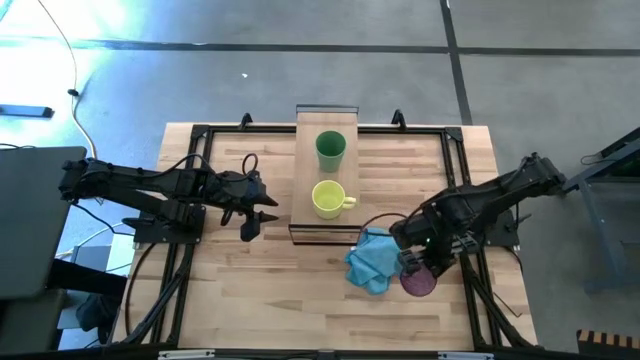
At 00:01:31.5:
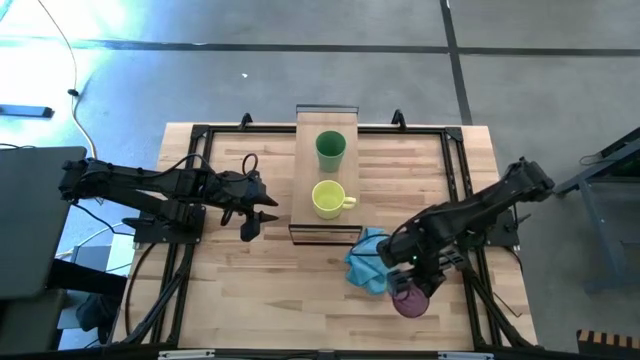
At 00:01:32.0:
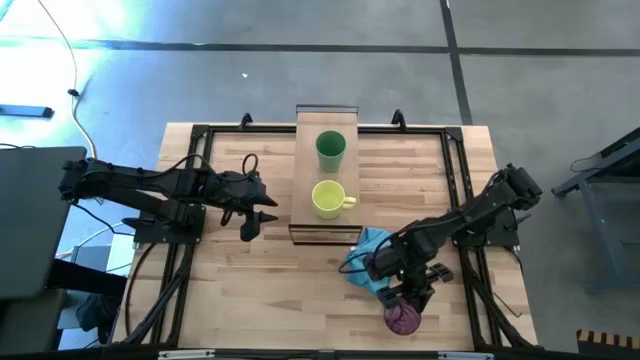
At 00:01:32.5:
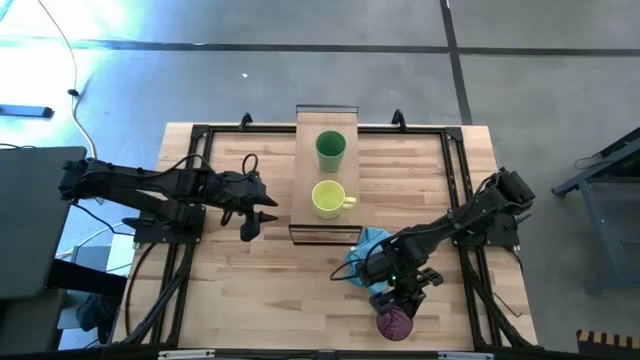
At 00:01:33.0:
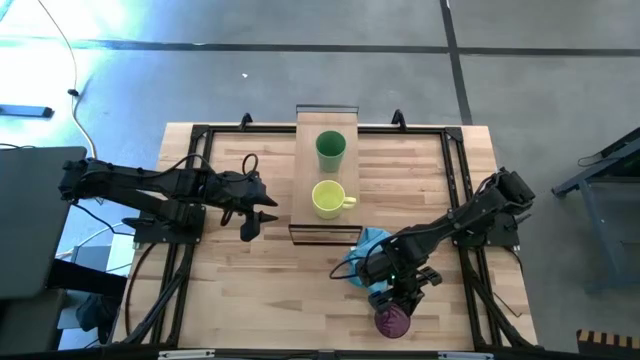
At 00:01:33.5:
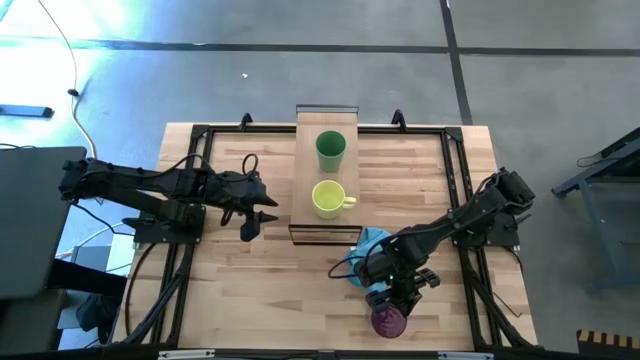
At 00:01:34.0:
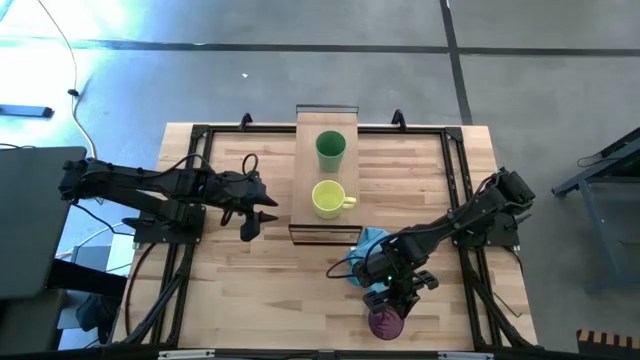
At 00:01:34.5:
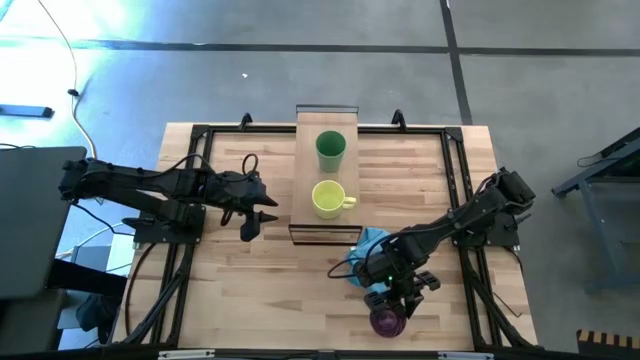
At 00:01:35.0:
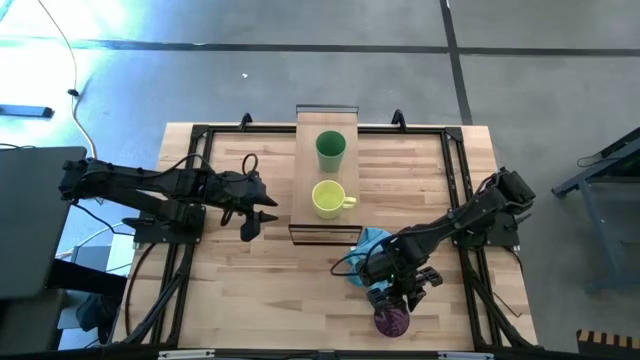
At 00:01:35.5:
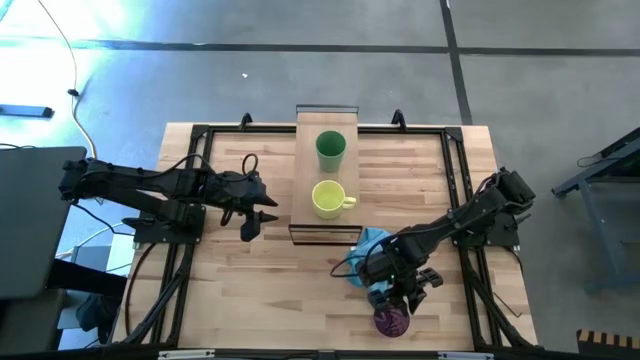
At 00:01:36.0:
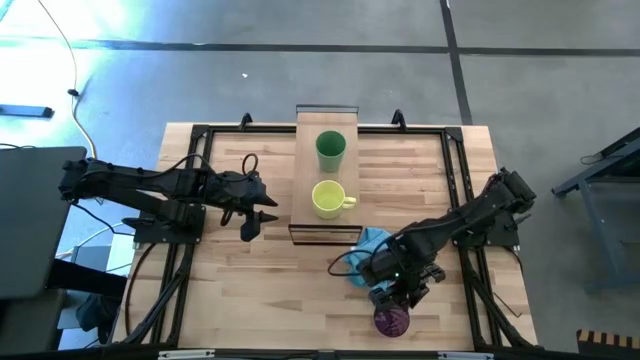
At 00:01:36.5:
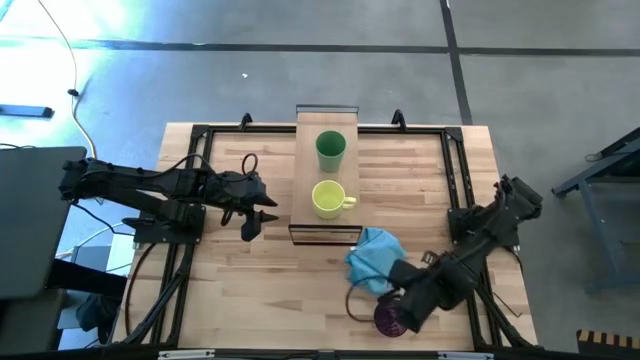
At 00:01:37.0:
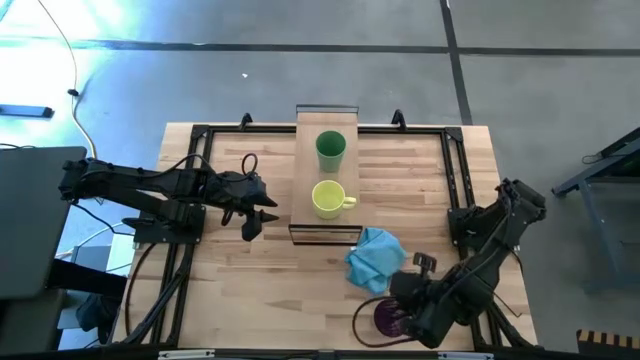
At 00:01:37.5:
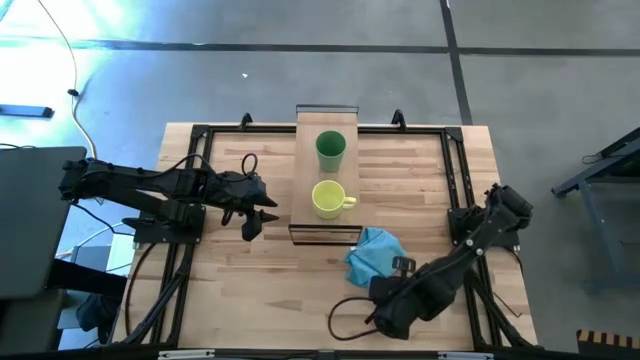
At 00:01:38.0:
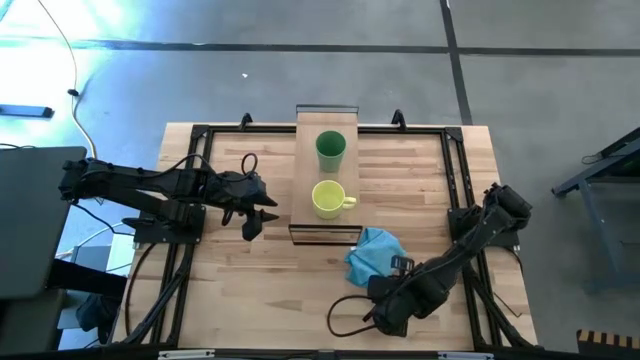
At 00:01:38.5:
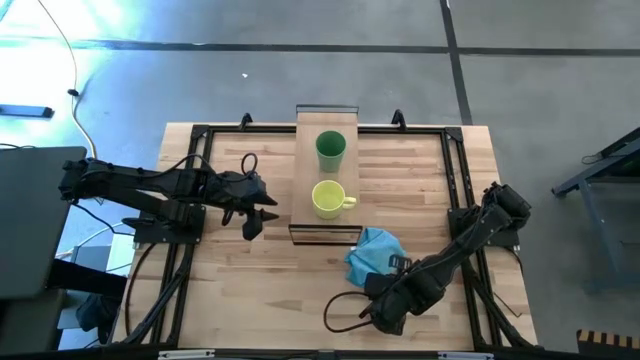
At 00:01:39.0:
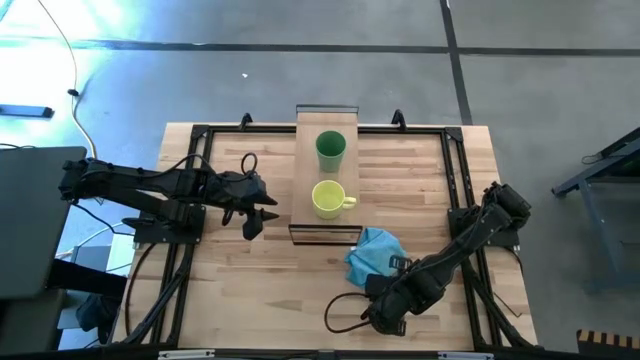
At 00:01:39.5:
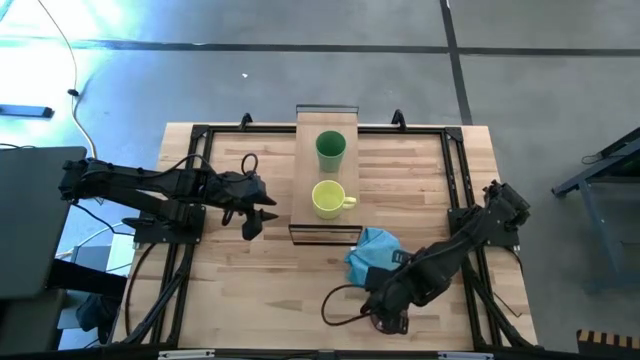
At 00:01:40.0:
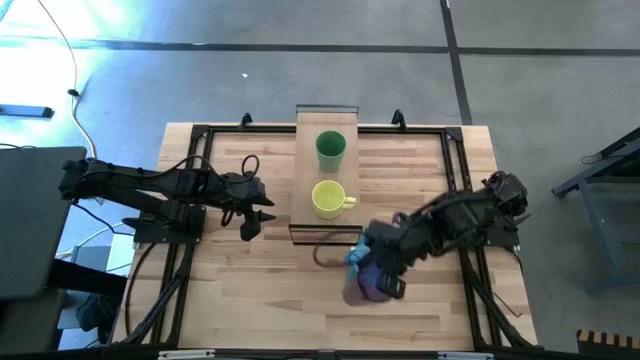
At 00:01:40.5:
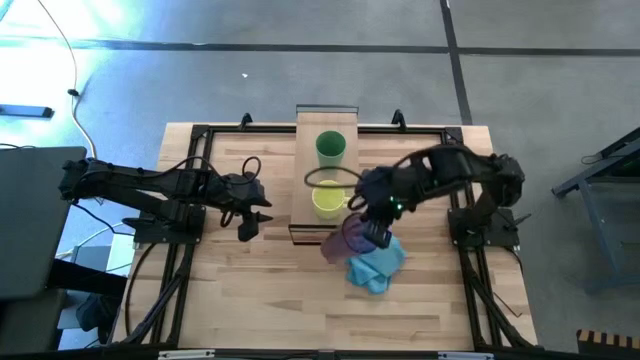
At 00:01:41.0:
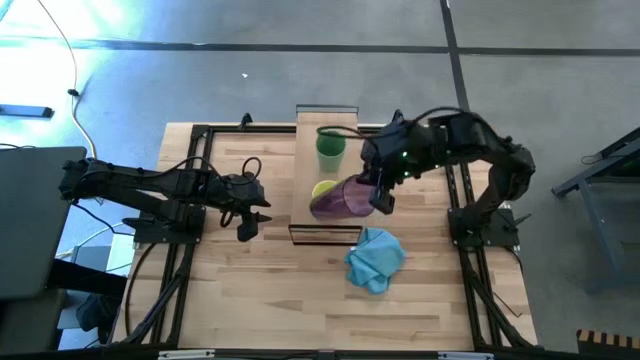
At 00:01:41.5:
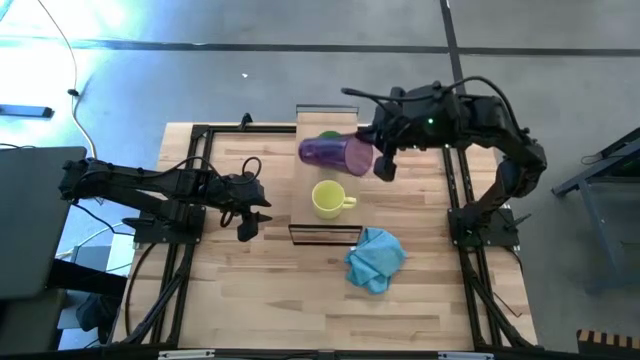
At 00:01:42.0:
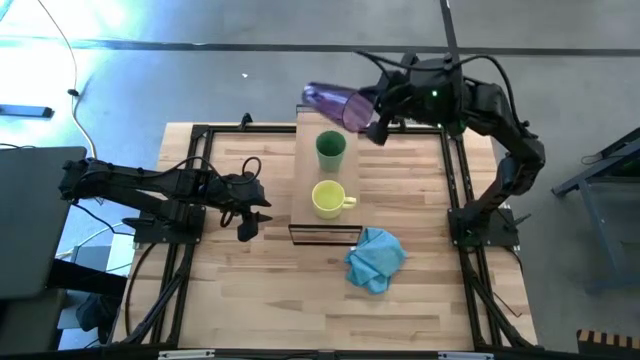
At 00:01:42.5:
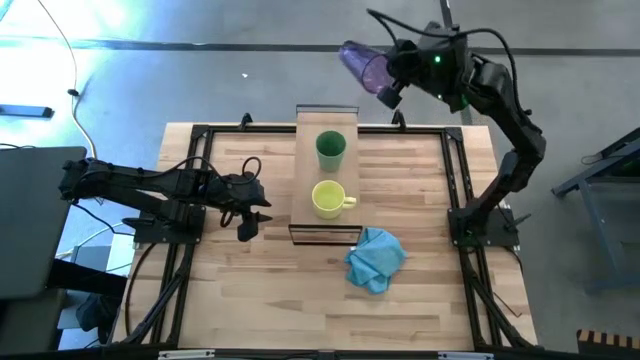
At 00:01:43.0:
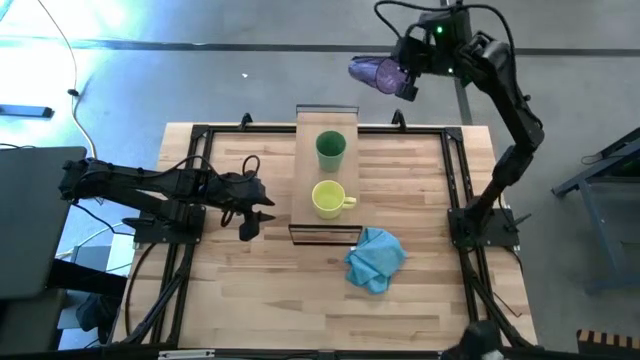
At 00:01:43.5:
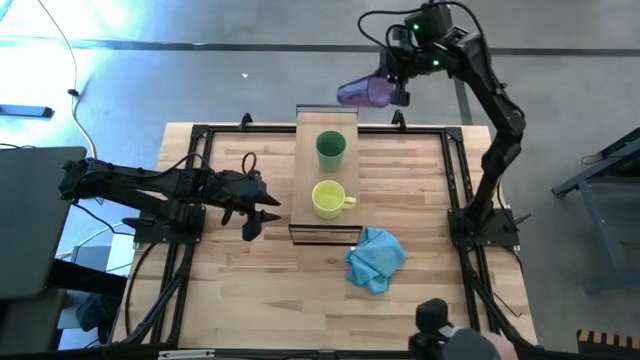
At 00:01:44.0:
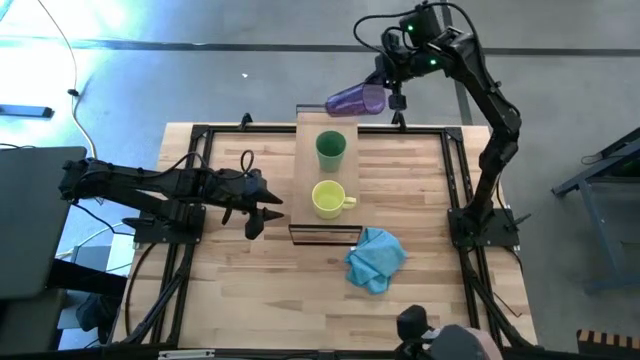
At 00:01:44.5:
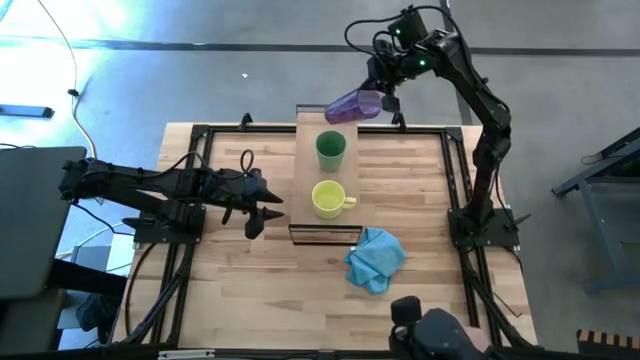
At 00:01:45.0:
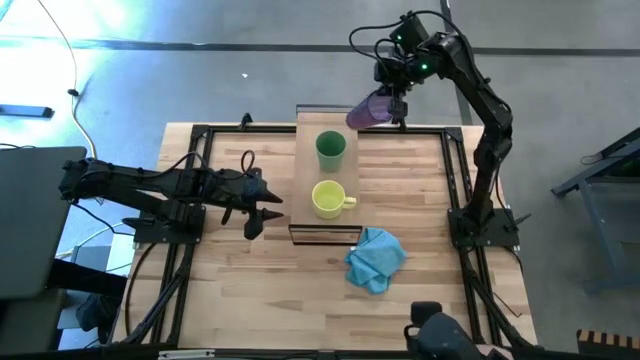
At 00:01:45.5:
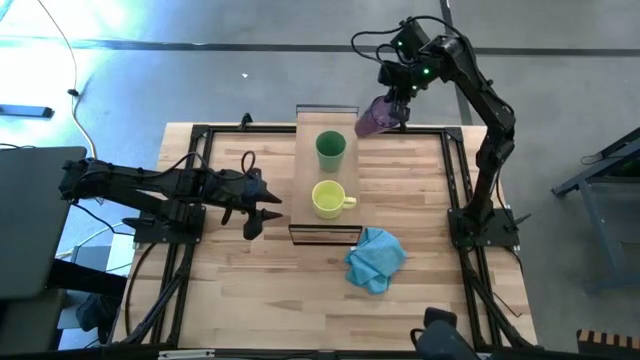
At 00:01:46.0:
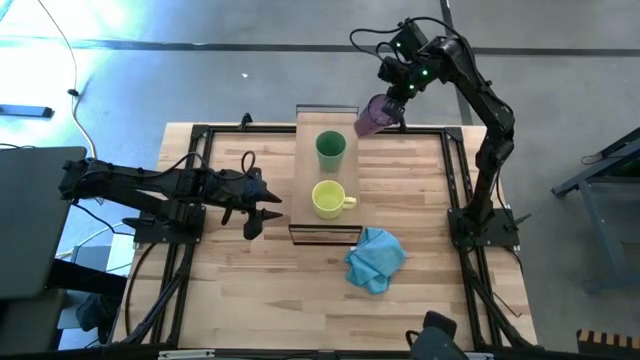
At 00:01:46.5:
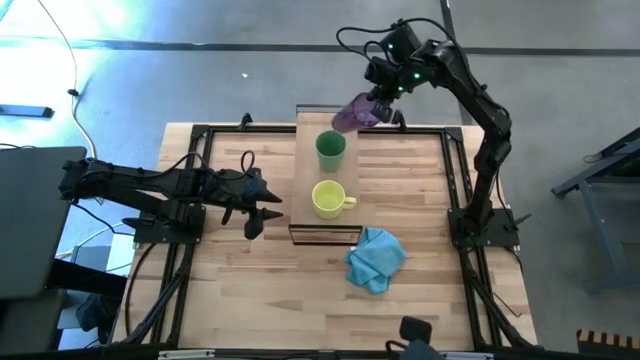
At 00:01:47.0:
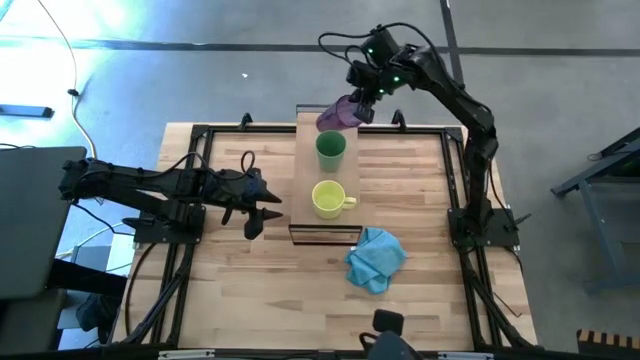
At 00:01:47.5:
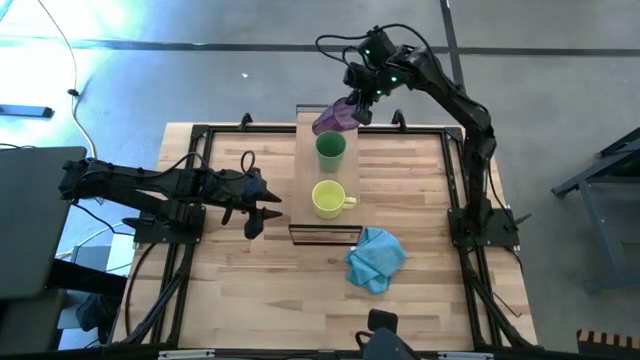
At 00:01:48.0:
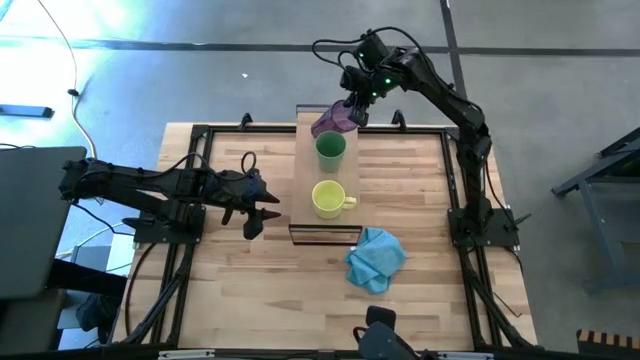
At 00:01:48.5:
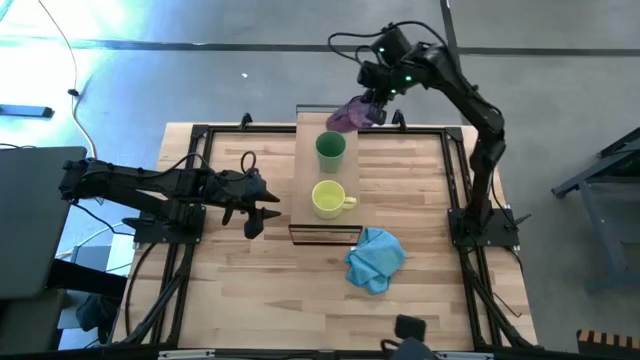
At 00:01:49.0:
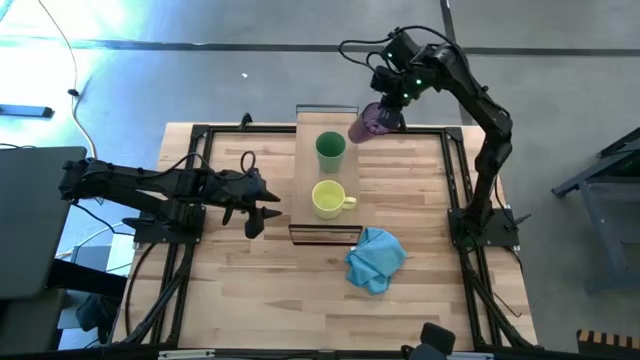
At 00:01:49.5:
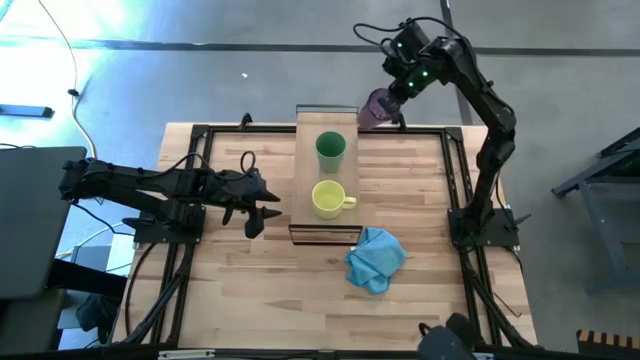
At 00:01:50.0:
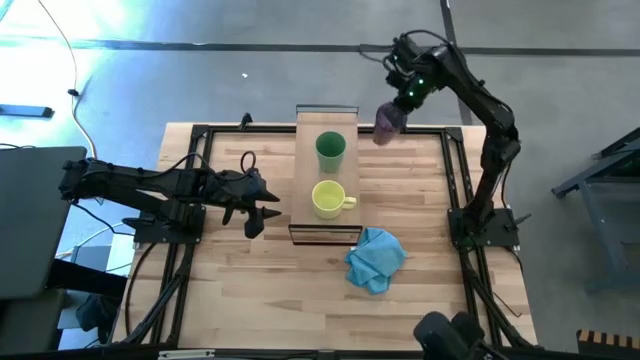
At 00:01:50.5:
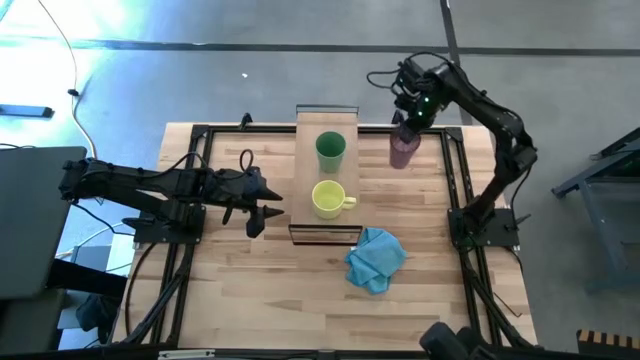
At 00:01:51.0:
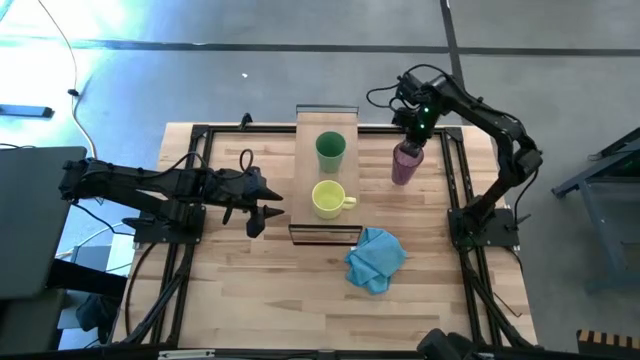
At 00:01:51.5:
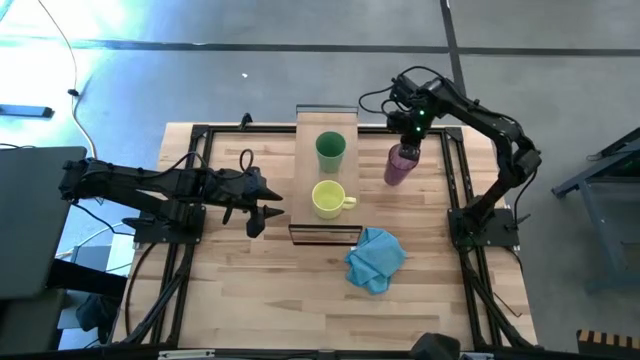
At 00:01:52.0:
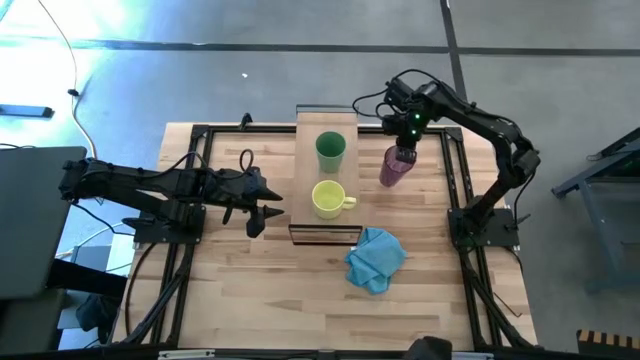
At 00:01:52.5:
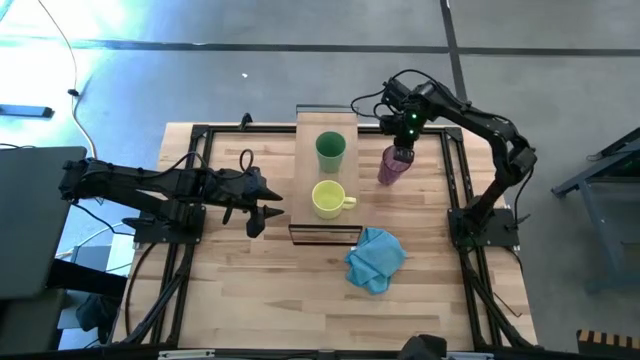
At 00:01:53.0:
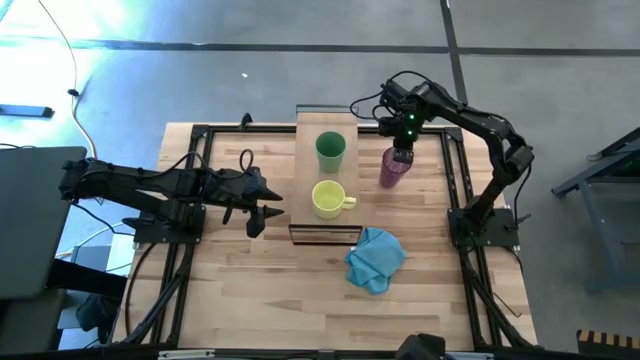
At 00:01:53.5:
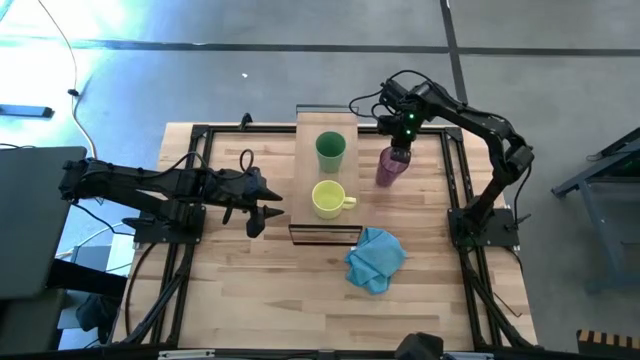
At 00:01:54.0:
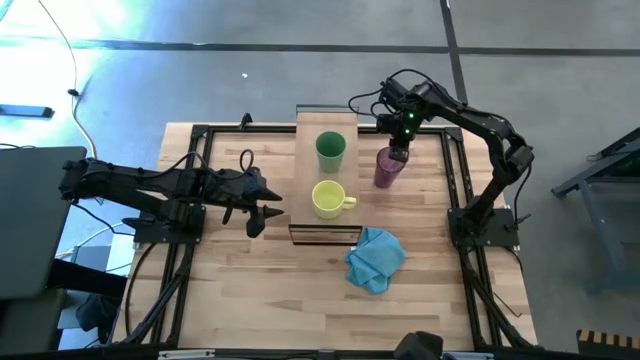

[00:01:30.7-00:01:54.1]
Task: Stack small to large cups/mugs on shelf
Put the violet cup on the shelf
